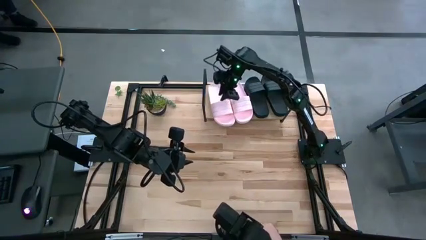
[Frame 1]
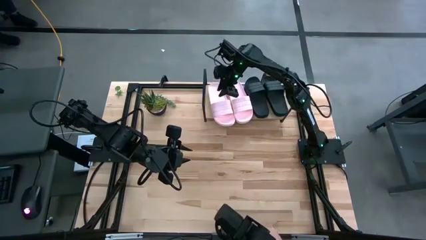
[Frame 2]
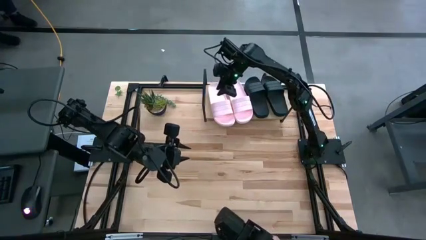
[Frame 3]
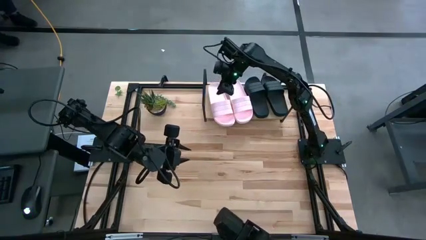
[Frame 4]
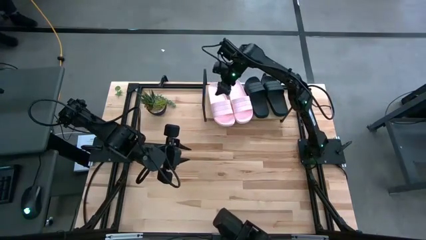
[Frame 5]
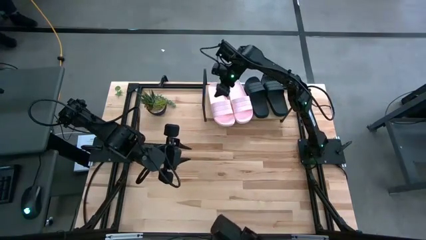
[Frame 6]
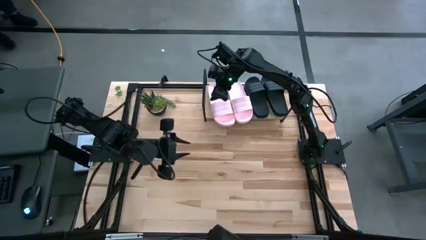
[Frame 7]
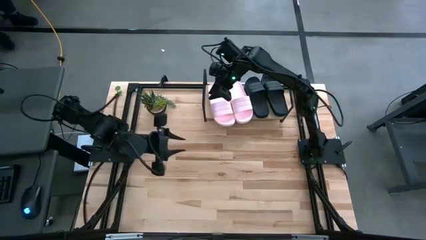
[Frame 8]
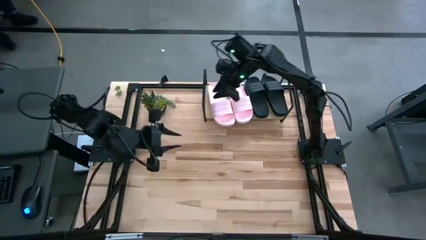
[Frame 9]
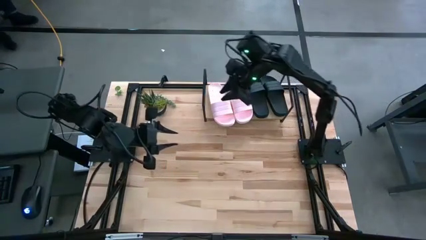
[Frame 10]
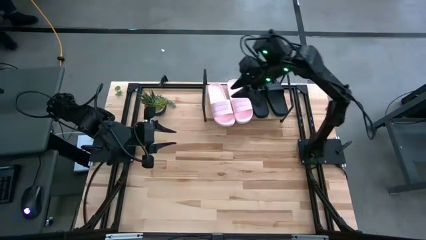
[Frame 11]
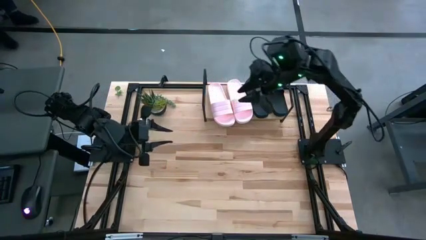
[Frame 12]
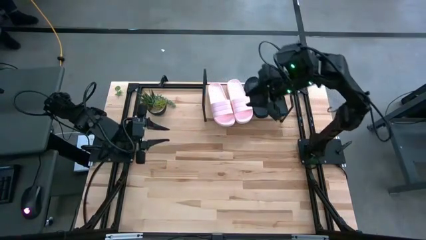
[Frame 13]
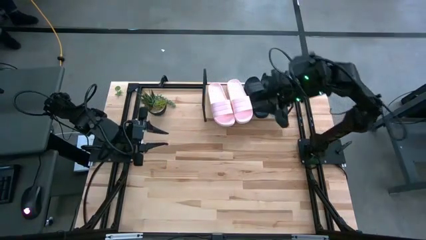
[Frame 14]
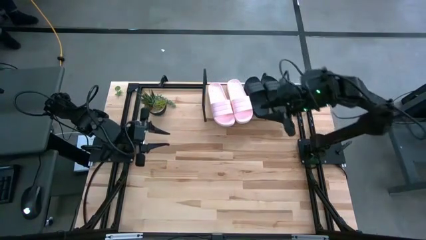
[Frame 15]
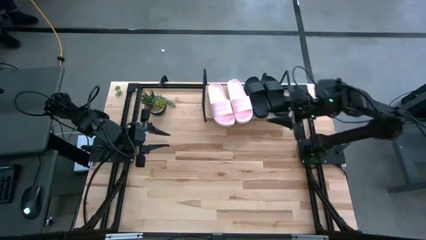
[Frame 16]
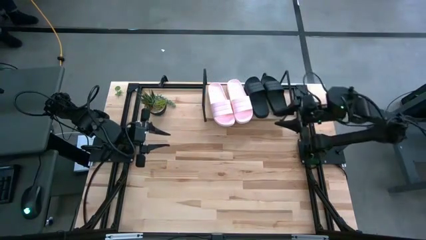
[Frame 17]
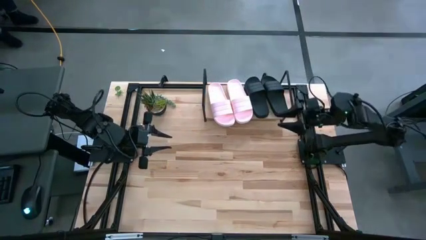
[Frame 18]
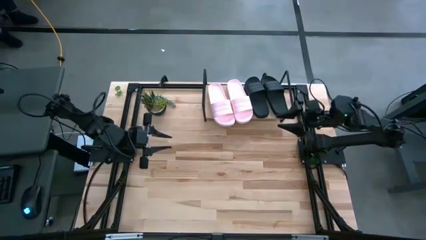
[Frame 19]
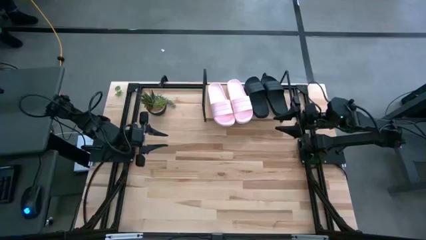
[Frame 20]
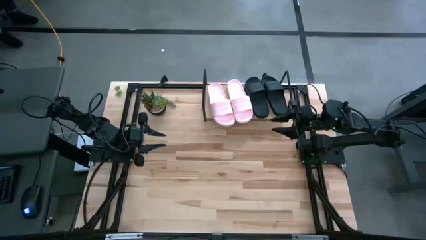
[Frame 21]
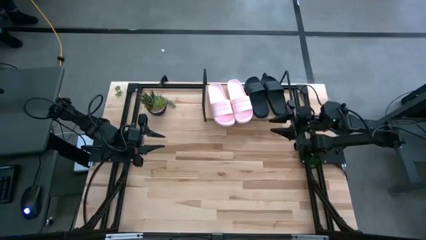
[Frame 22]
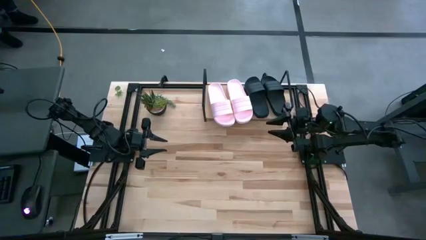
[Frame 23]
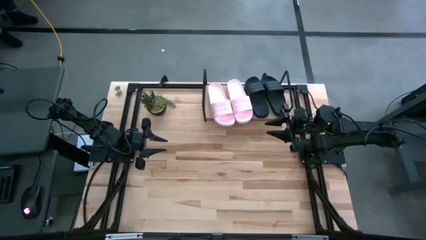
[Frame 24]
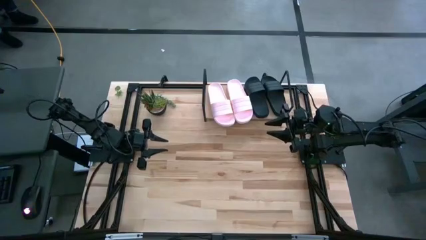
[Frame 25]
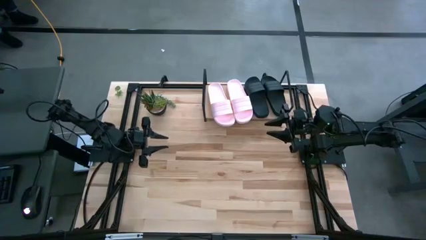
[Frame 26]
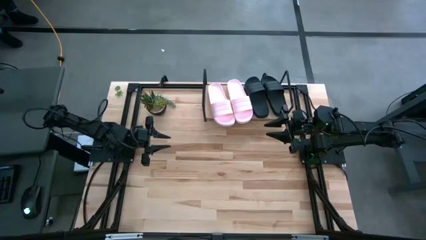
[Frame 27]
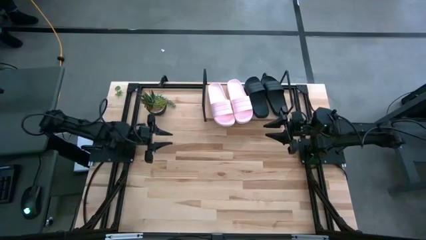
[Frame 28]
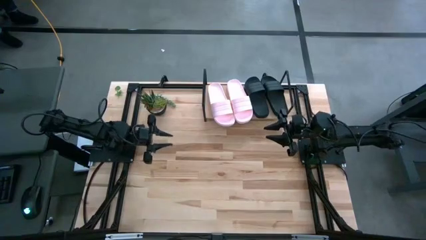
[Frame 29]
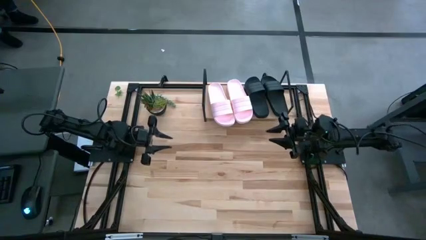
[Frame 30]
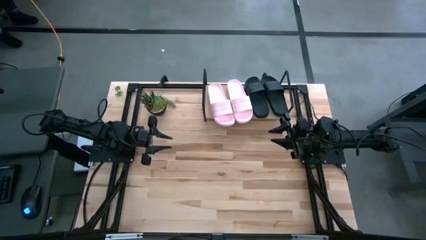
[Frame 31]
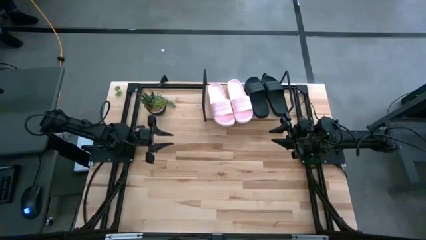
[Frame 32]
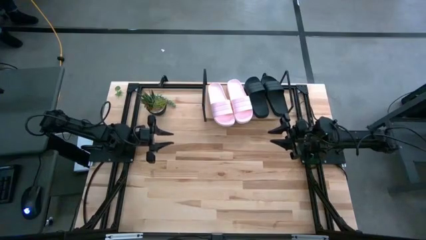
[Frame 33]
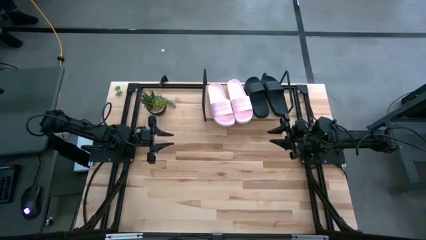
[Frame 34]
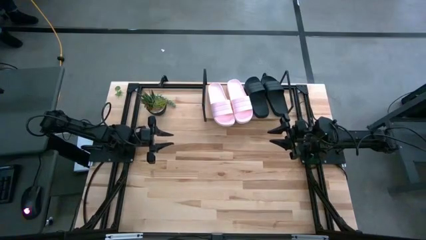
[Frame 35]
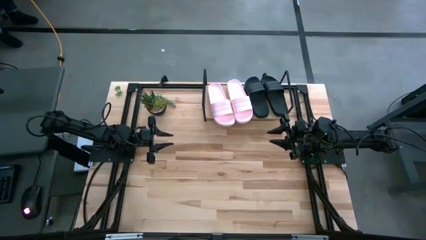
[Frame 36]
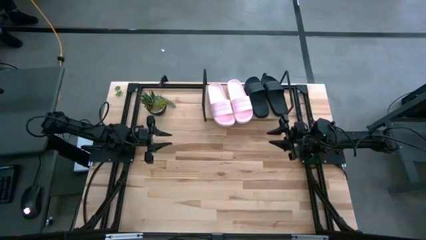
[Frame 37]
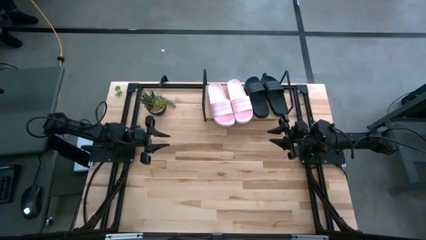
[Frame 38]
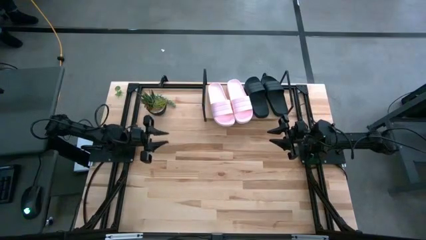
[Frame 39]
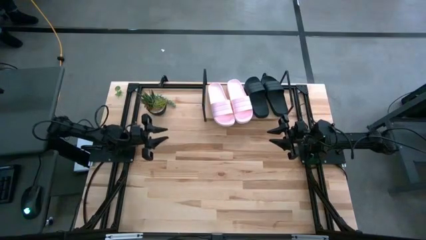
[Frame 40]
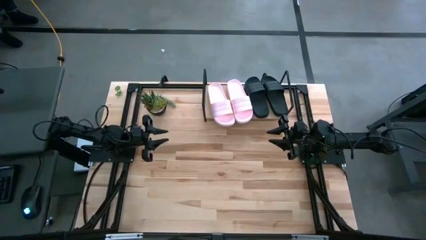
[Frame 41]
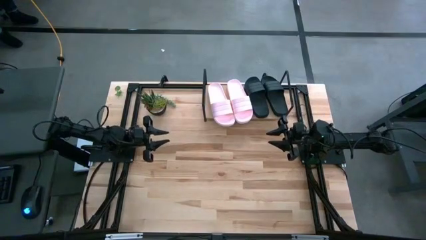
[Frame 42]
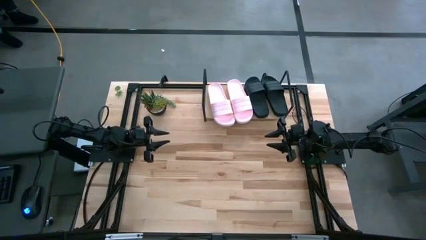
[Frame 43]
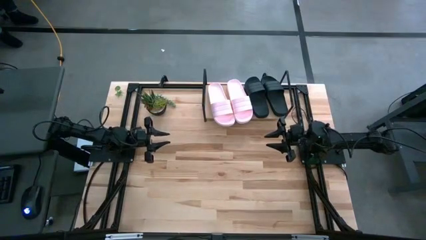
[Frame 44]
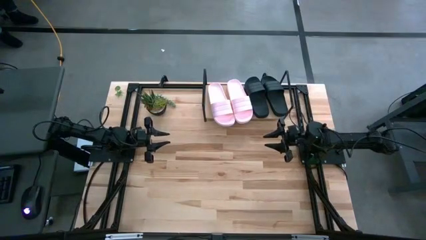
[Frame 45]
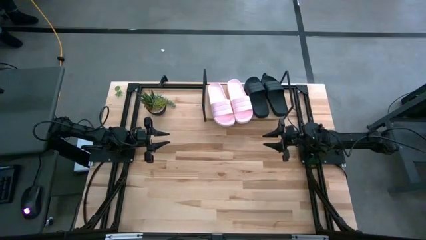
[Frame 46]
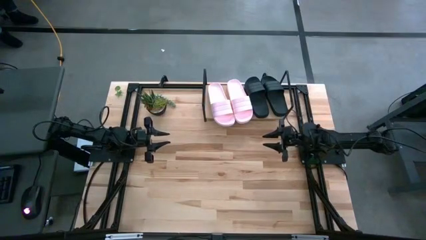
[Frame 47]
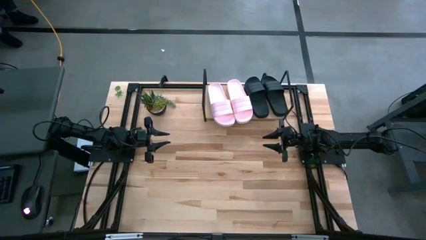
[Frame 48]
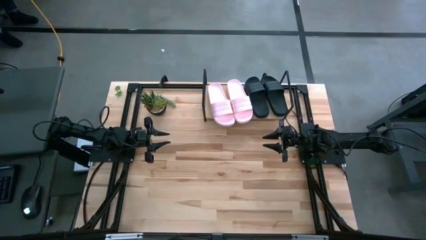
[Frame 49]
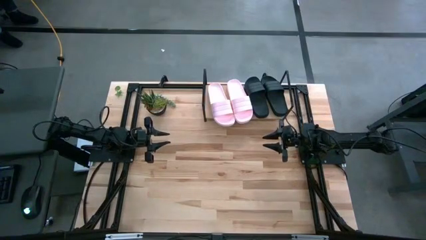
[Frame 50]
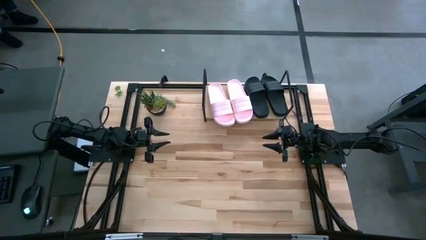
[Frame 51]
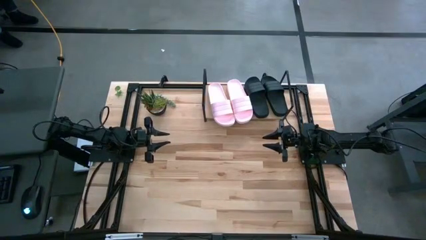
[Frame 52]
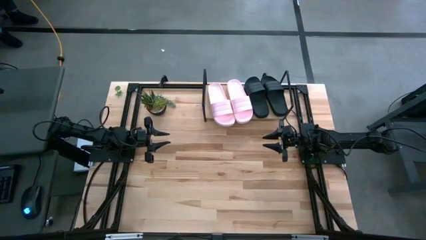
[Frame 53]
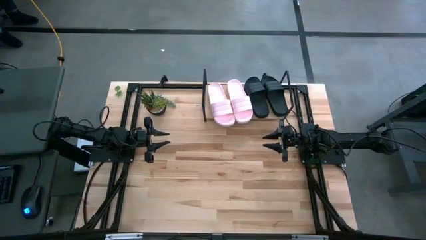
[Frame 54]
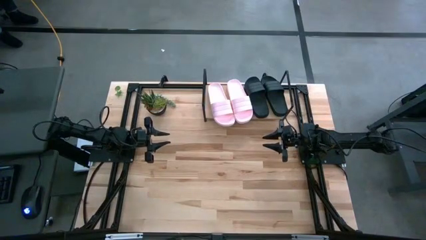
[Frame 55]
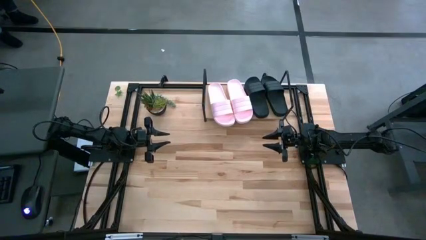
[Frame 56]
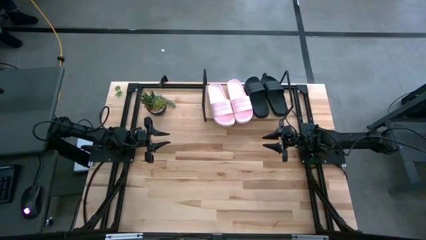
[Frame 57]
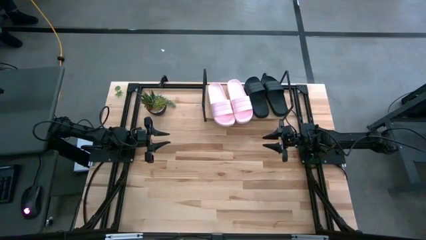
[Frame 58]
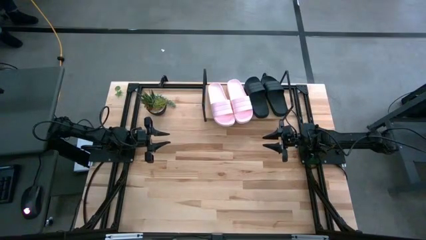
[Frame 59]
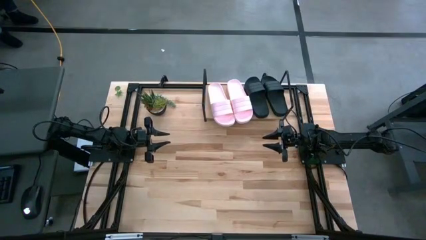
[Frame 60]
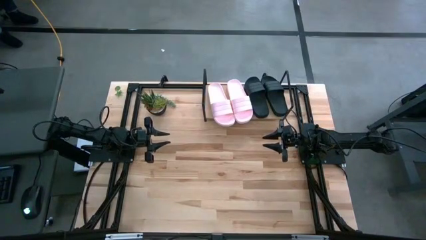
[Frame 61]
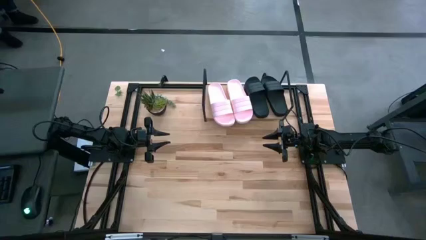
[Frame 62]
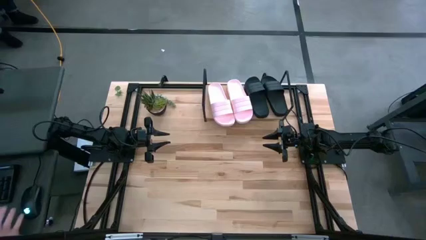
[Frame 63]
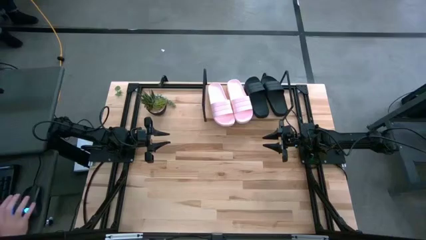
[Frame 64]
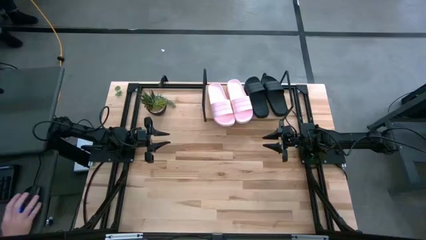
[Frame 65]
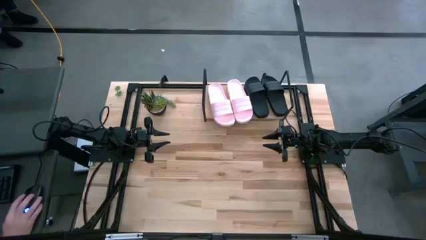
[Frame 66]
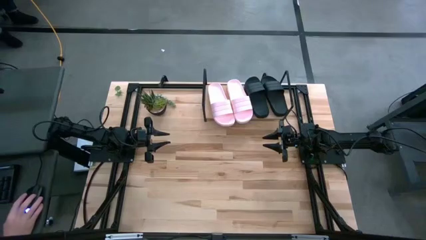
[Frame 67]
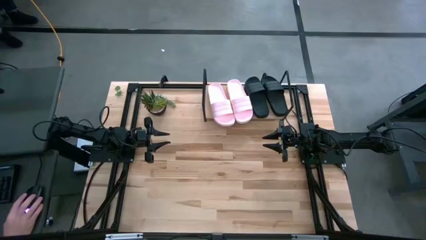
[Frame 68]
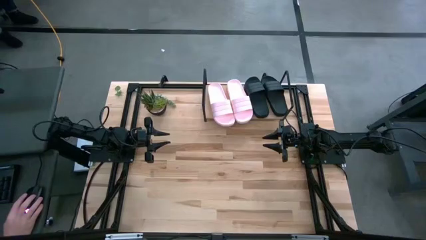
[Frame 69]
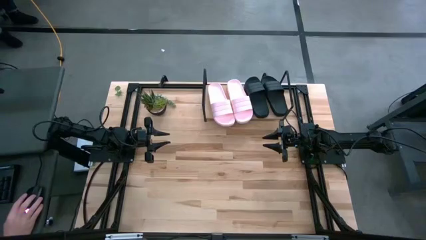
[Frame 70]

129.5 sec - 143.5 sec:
Task: Pick and place slides into the shelf
Return to Home Position

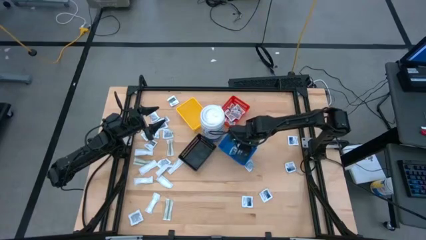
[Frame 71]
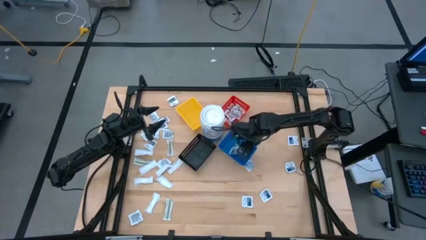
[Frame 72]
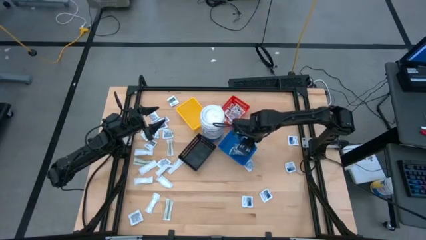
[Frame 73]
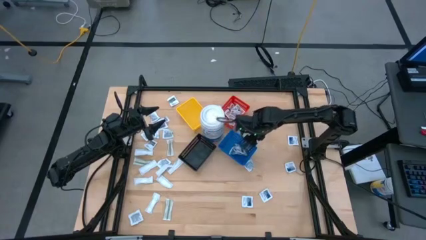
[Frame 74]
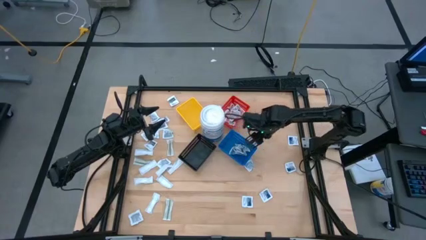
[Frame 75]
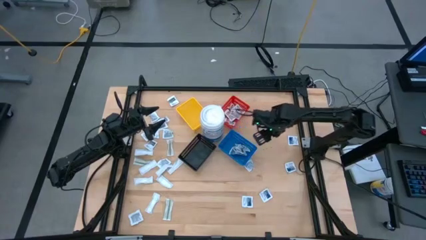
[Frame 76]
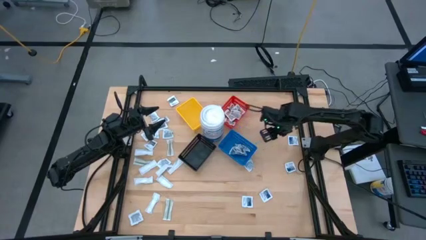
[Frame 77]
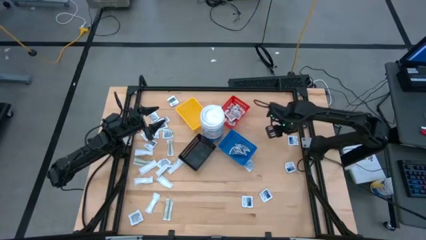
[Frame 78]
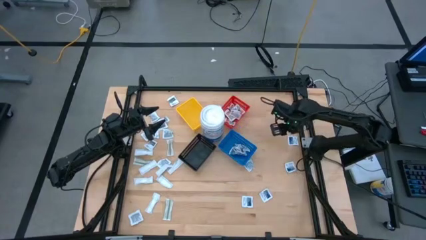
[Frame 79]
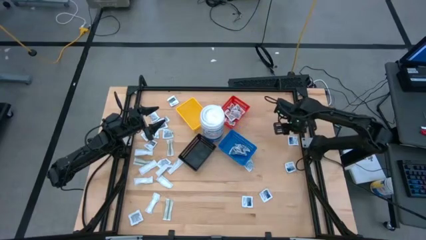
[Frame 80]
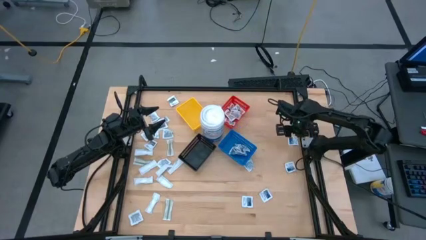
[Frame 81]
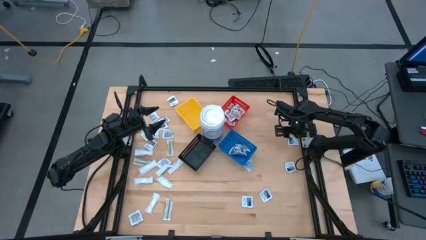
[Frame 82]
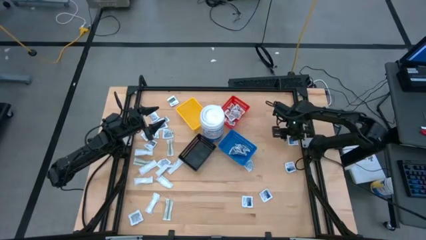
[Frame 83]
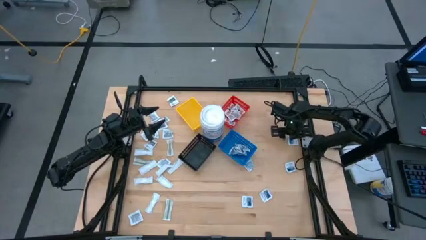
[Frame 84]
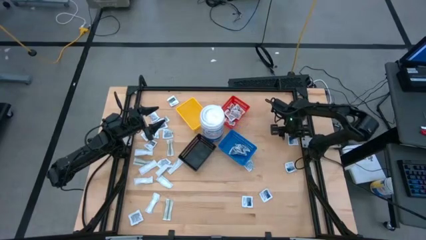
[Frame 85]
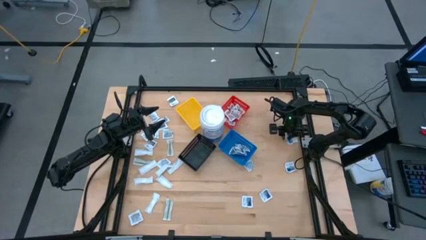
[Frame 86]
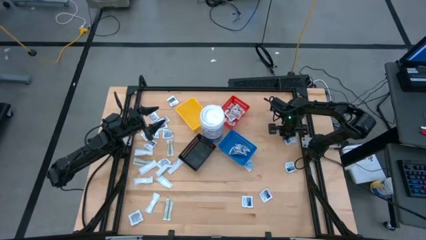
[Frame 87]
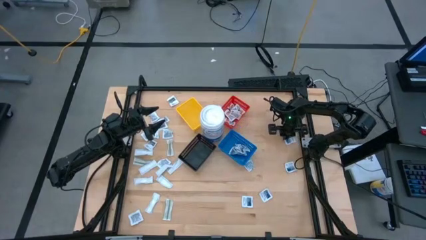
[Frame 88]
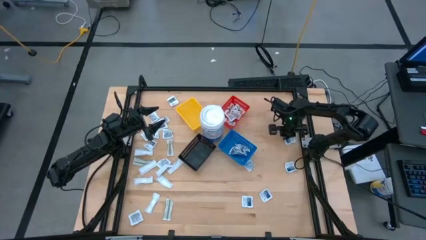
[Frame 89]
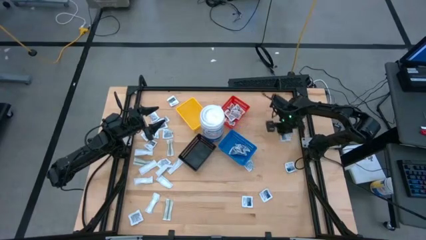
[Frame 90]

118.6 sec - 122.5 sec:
Task: Pick & Place First Aid Supplies
Put the alcohol pad into the blue bin
